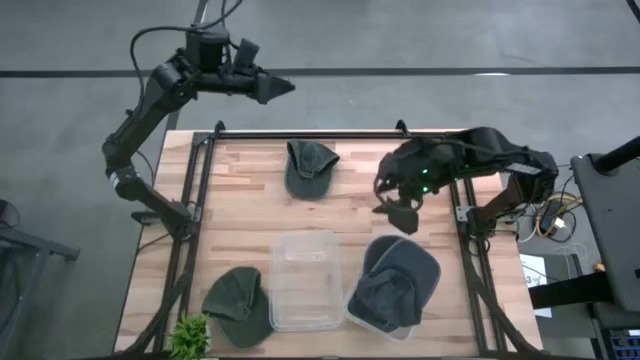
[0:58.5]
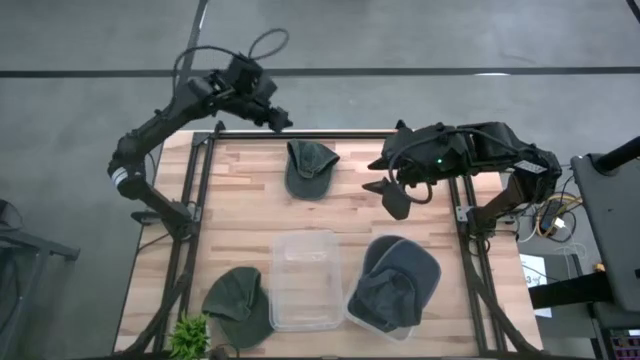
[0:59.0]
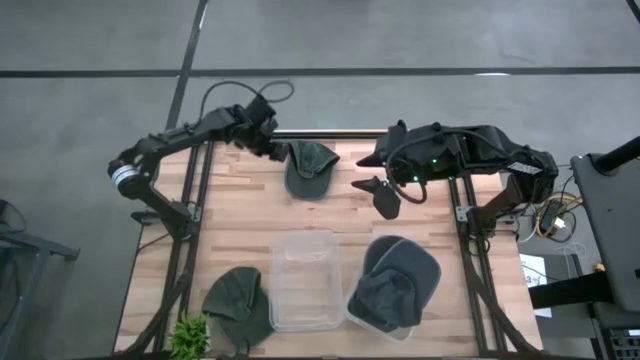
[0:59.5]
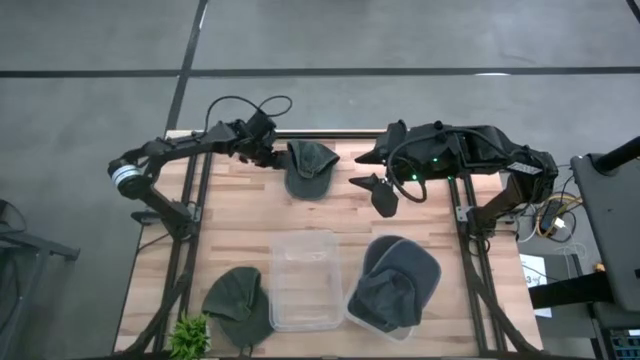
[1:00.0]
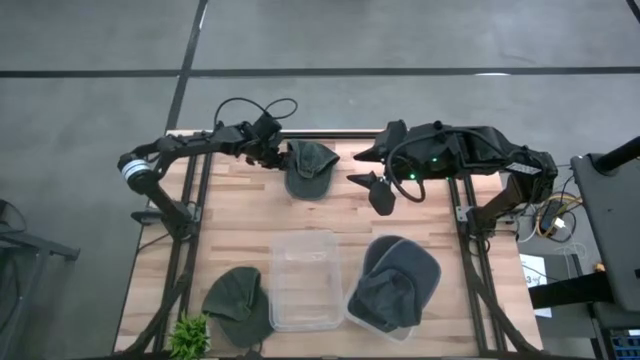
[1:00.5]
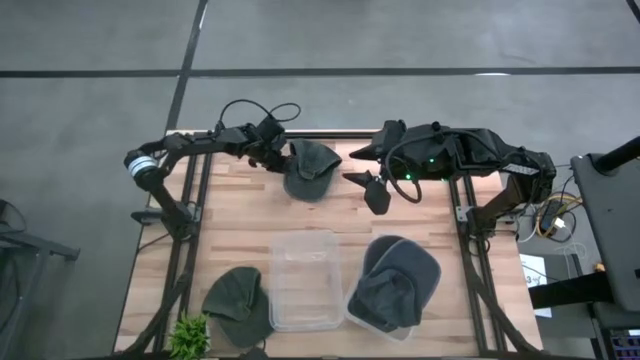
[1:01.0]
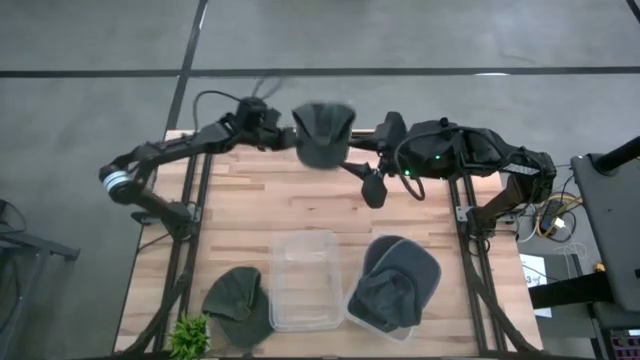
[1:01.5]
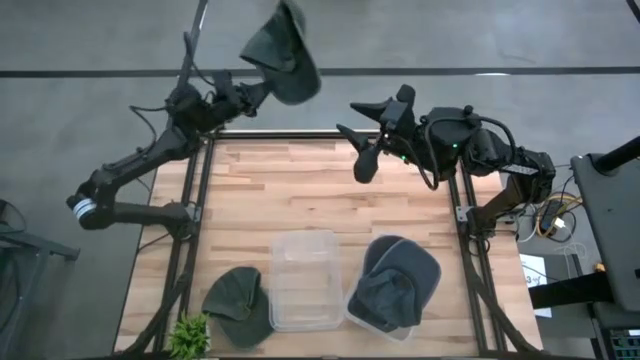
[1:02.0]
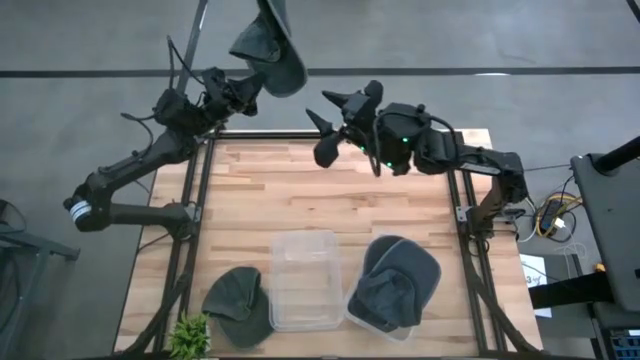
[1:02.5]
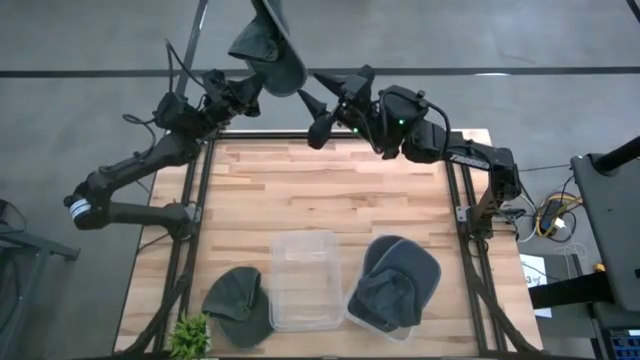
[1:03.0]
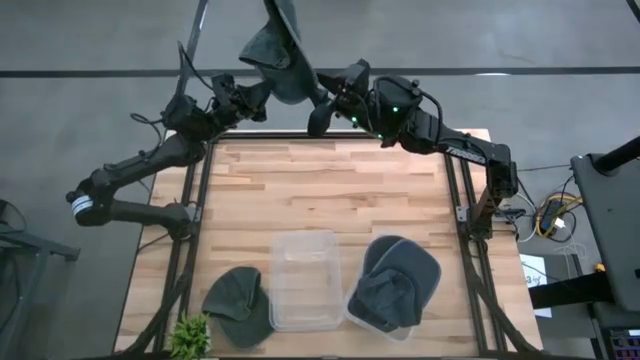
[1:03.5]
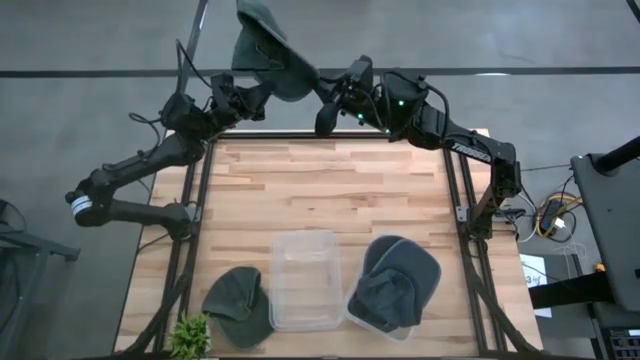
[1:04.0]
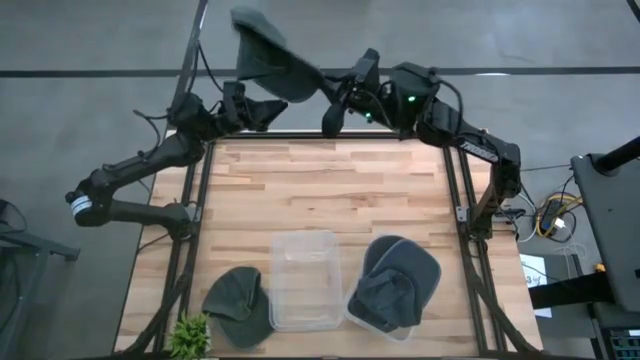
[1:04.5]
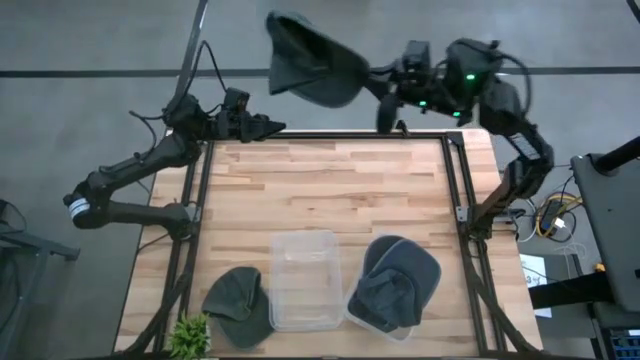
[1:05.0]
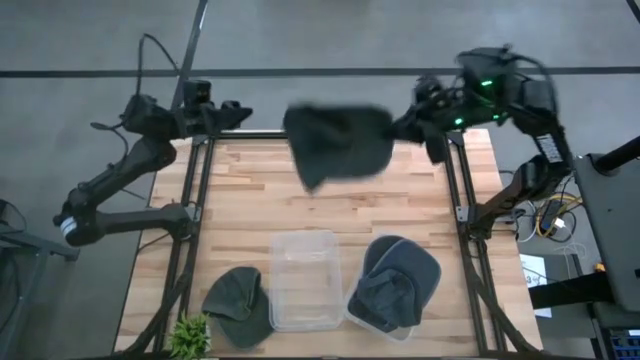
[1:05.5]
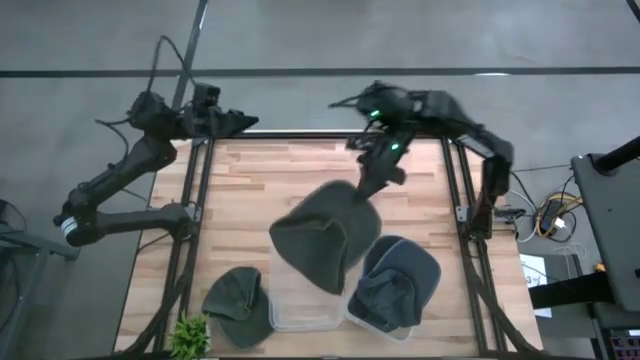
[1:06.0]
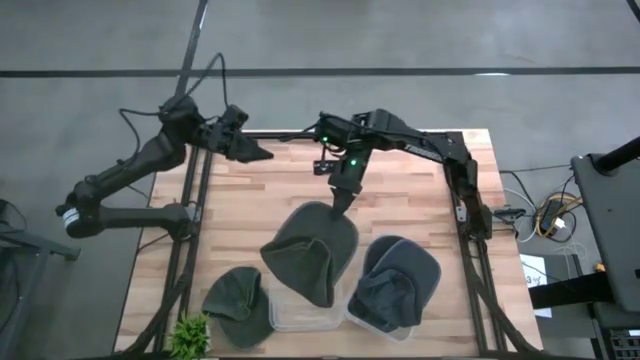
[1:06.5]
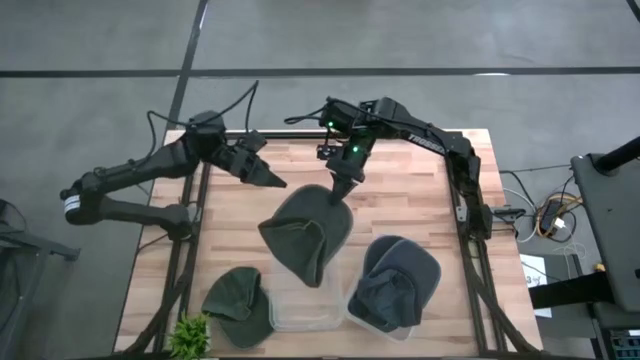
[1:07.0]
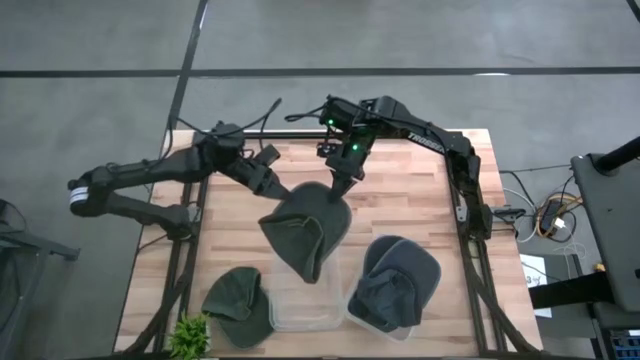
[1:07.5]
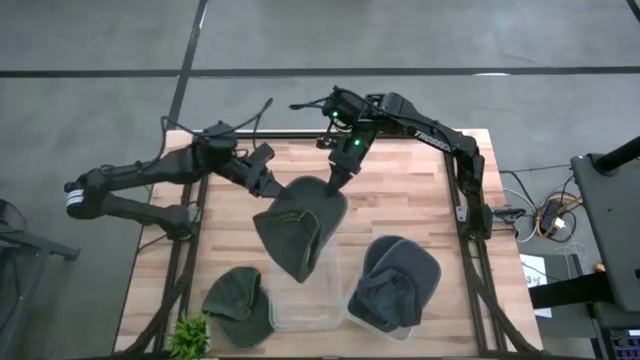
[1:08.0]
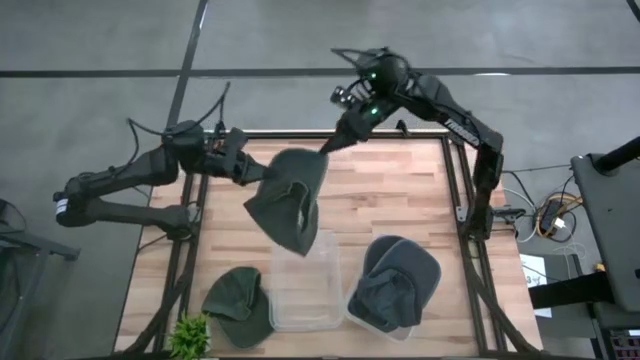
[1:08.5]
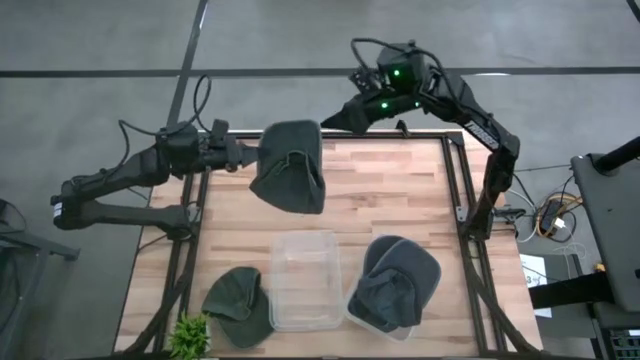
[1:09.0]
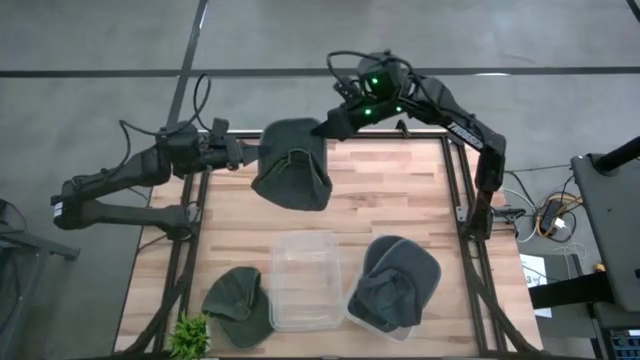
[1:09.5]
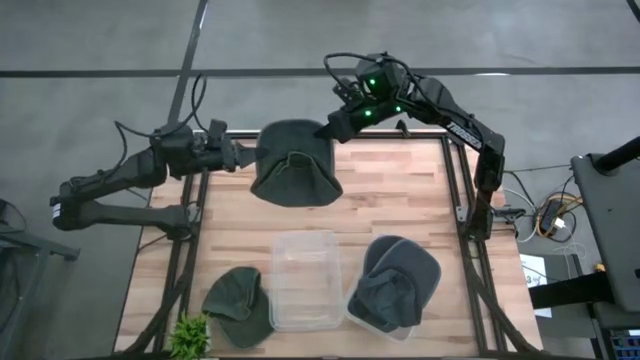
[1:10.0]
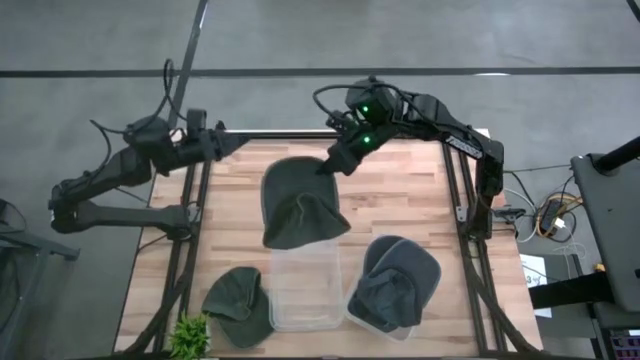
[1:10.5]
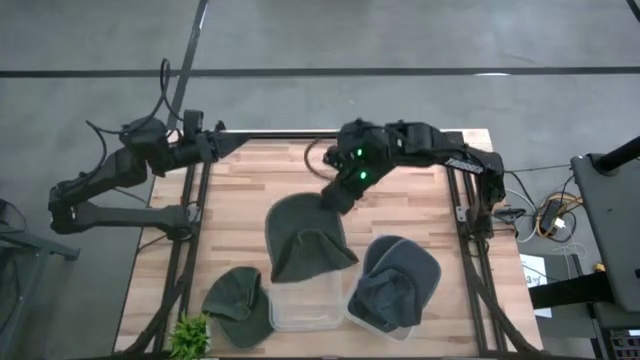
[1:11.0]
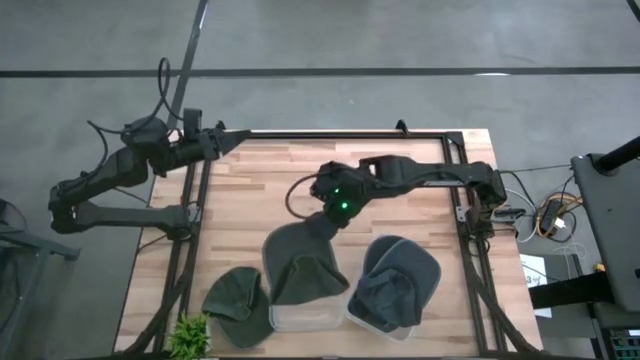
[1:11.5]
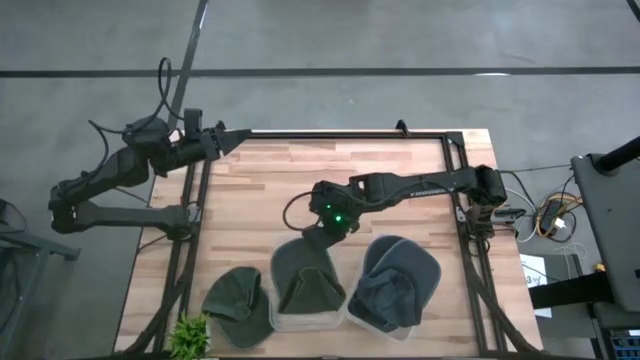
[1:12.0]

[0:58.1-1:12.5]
Task: Pick & Place hat
Put the top black cap into the left transparent container

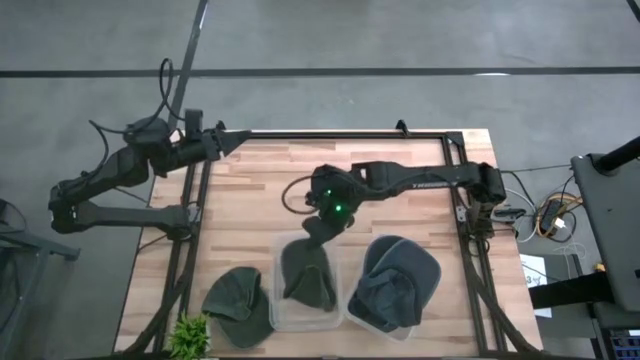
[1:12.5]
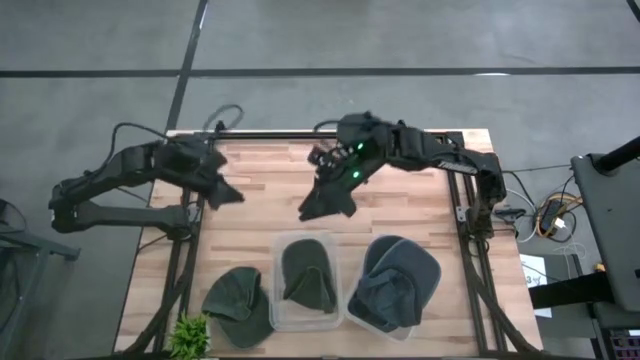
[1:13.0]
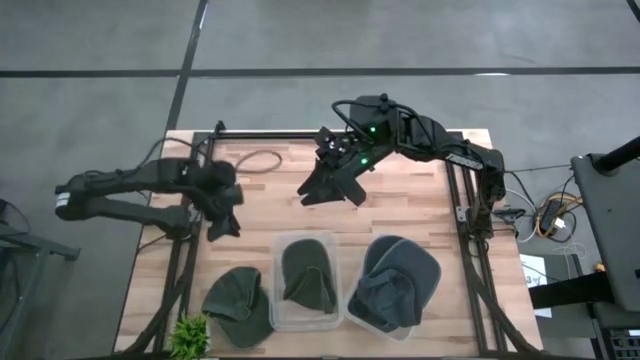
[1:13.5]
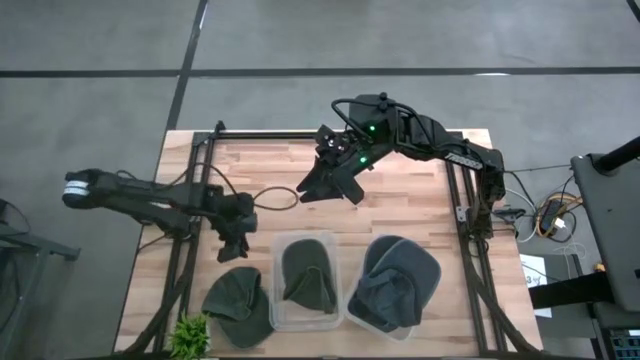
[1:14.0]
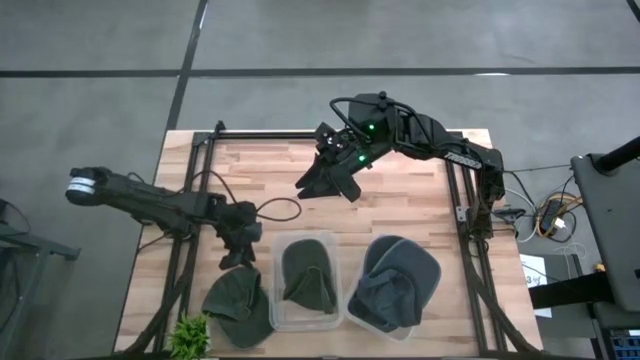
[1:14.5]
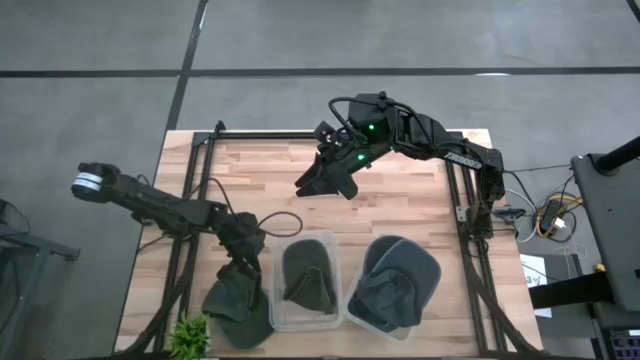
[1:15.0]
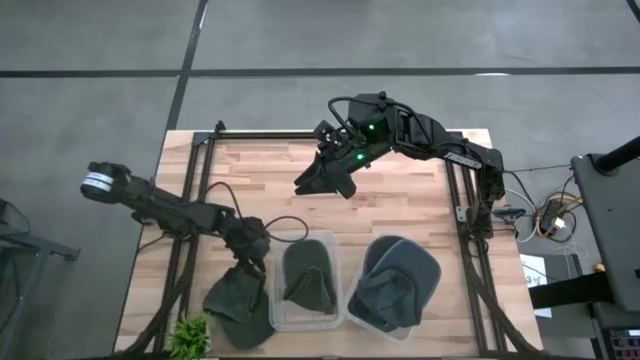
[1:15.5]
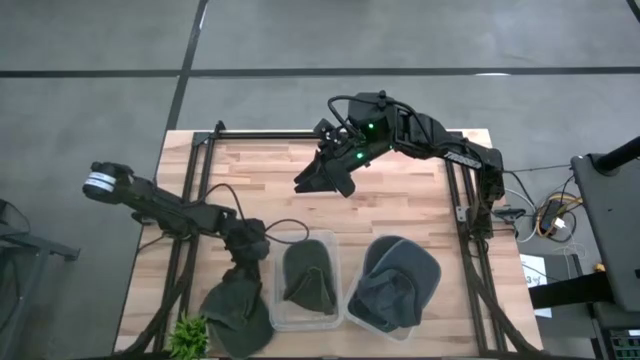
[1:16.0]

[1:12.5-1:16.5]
Put the black cap into the left transparent container

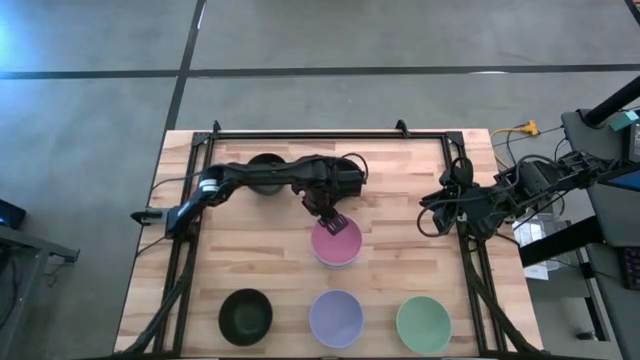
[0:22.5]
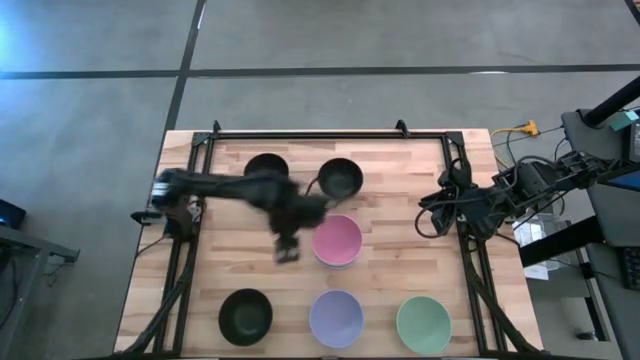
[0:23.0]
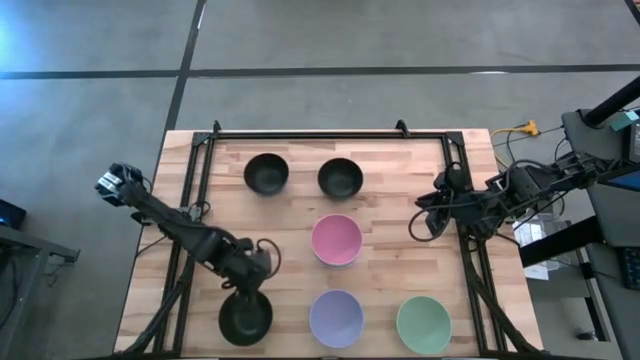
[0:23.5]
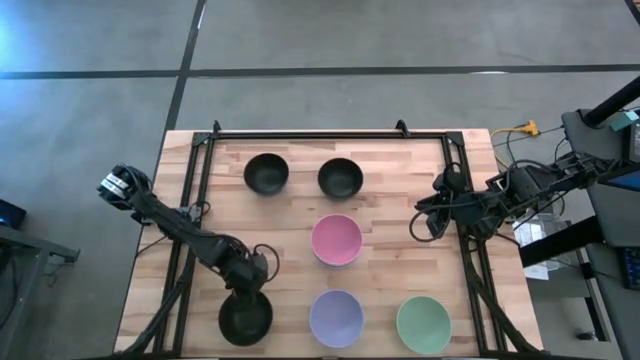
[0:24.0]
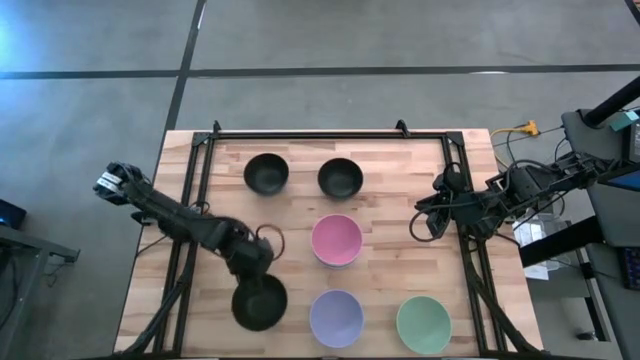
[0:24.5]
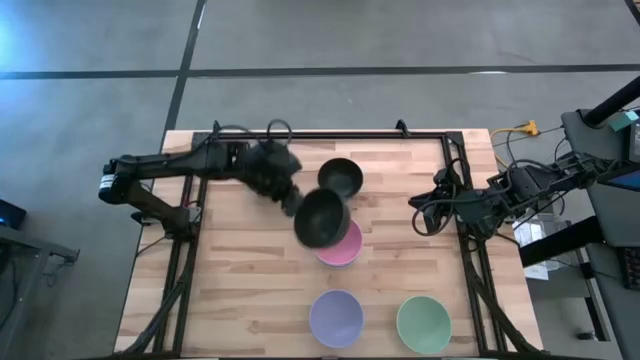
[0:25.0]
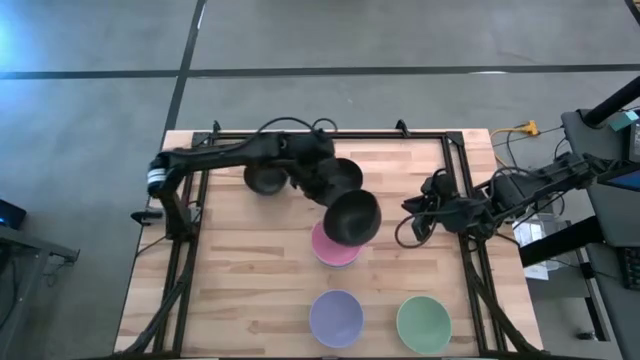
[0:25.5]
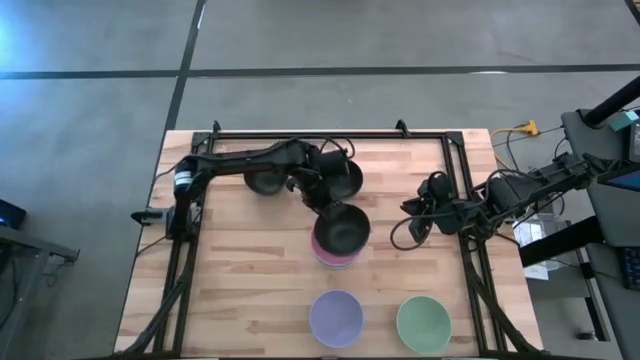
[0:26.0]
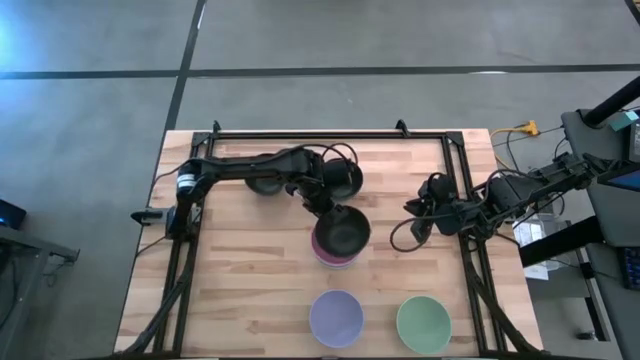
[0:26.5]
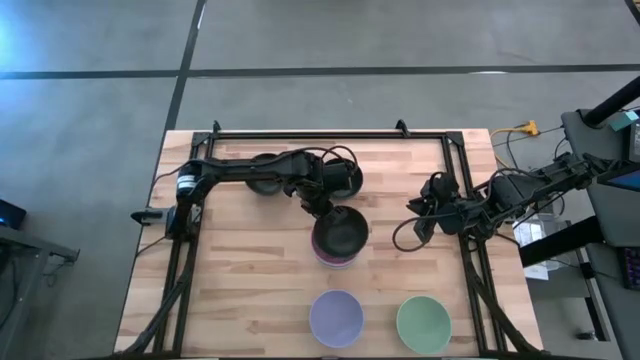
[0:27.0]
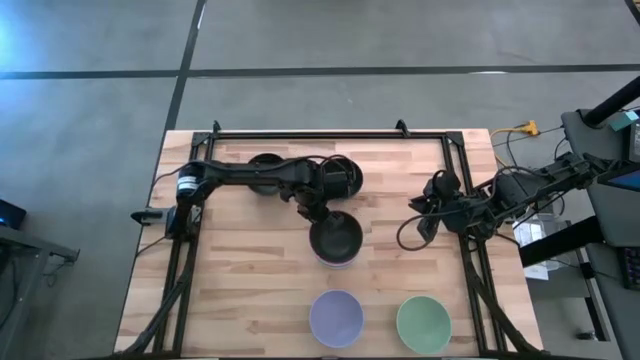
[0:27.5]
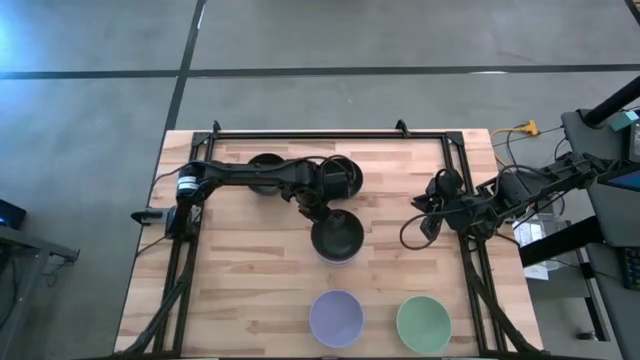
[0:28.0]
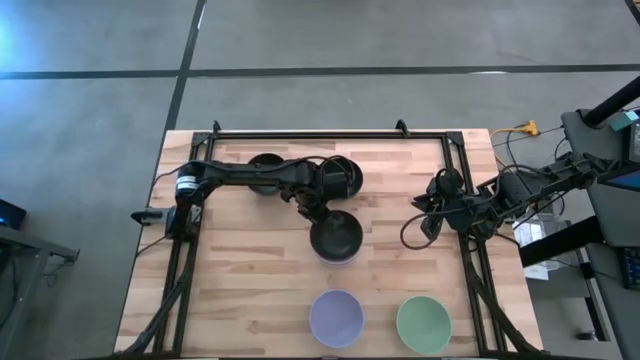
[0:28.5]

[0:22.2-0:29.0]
Task: Nest bowls inside each other
Stack the bottom black bowl on top of the pink bowl
